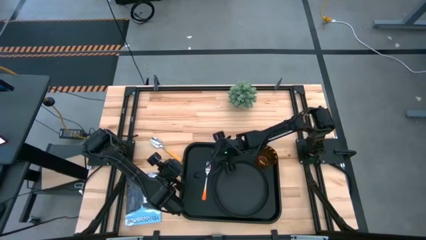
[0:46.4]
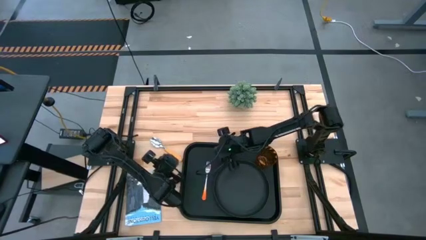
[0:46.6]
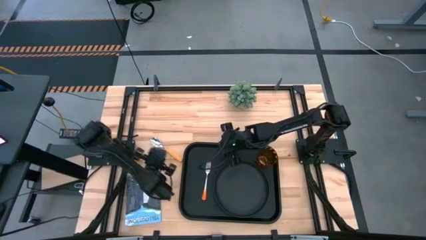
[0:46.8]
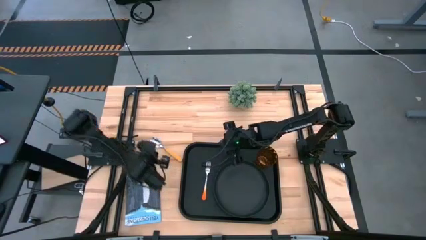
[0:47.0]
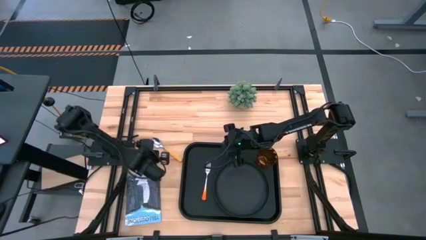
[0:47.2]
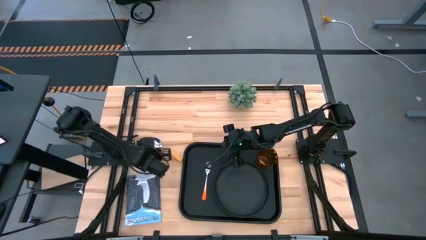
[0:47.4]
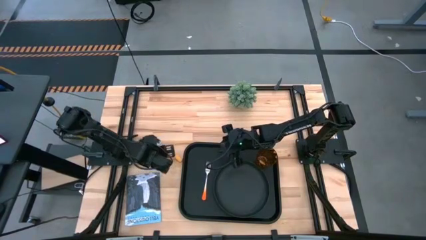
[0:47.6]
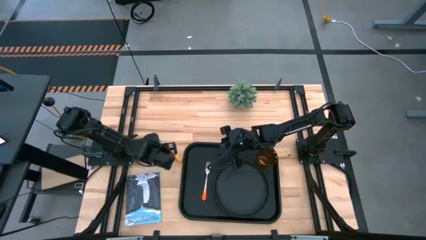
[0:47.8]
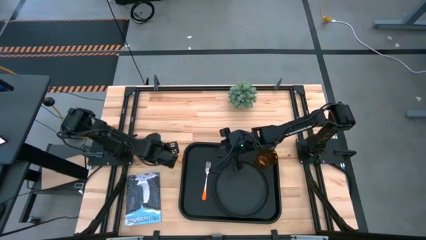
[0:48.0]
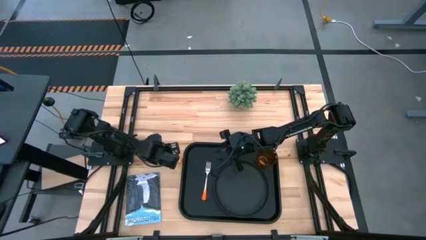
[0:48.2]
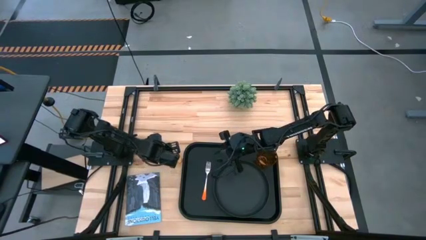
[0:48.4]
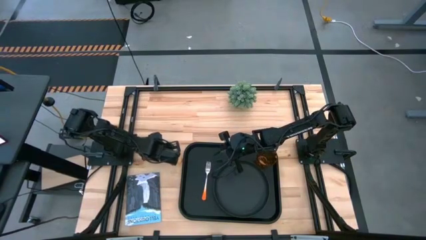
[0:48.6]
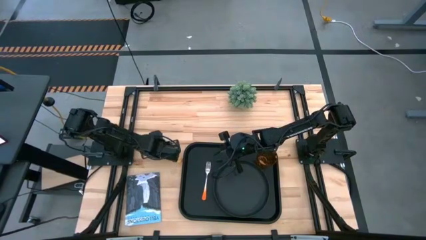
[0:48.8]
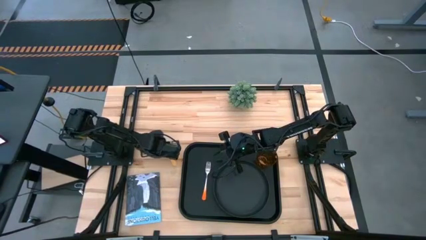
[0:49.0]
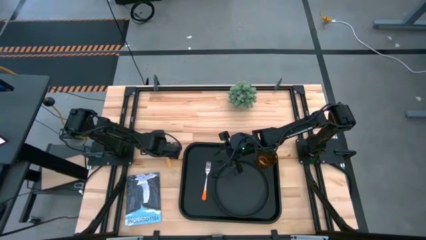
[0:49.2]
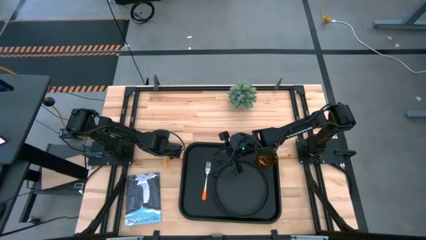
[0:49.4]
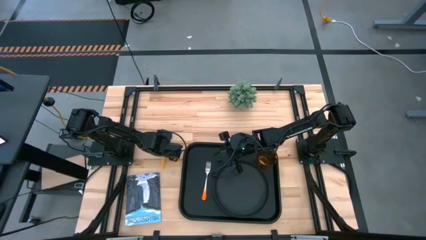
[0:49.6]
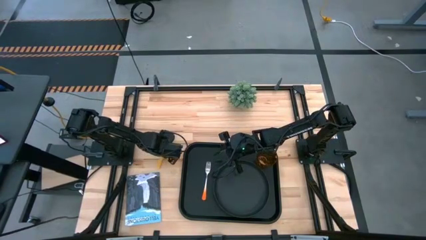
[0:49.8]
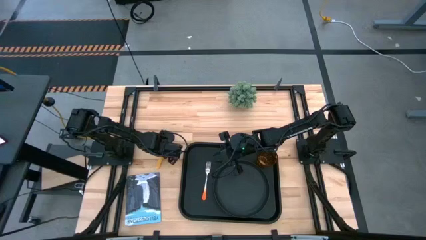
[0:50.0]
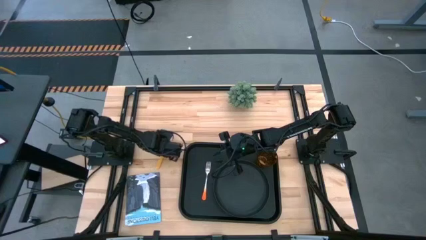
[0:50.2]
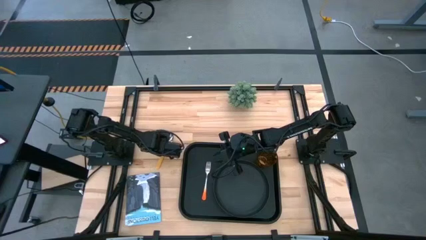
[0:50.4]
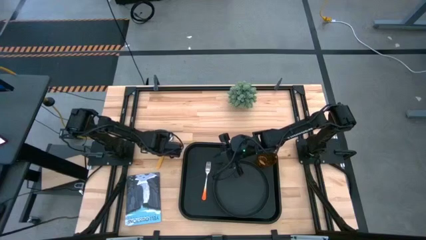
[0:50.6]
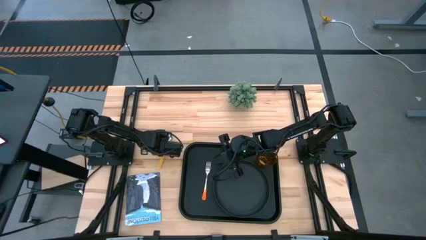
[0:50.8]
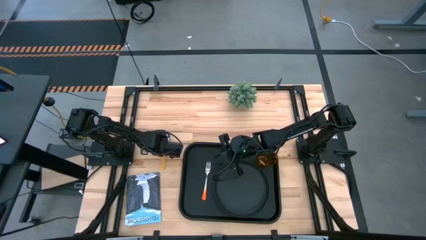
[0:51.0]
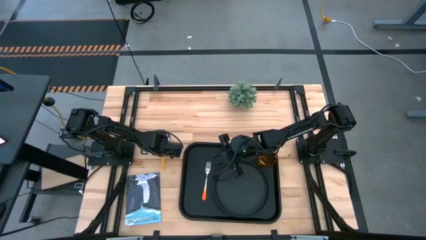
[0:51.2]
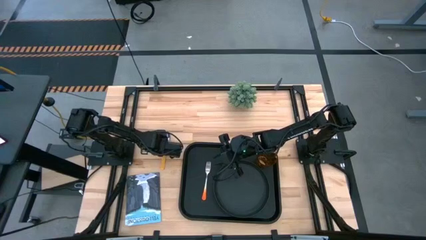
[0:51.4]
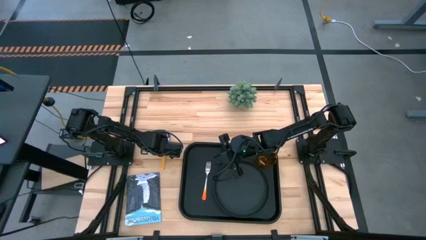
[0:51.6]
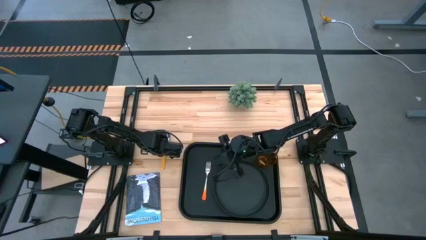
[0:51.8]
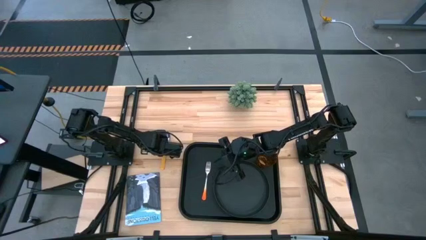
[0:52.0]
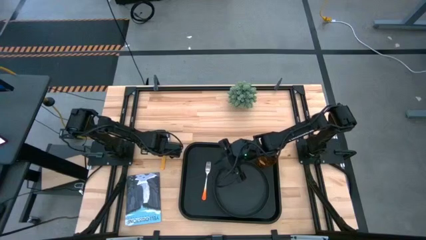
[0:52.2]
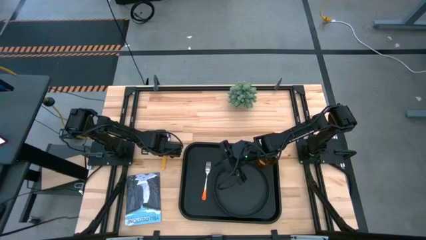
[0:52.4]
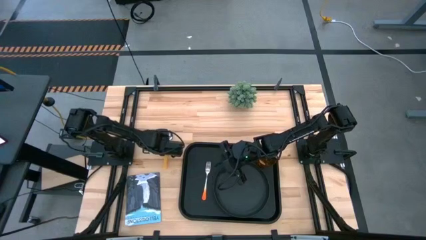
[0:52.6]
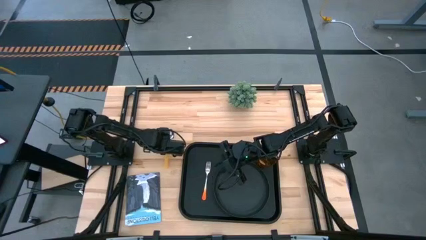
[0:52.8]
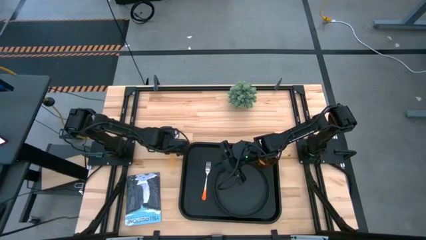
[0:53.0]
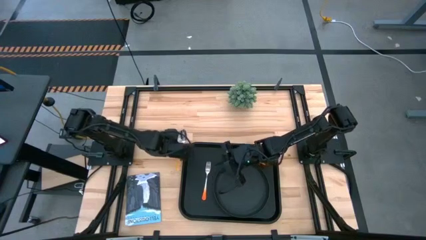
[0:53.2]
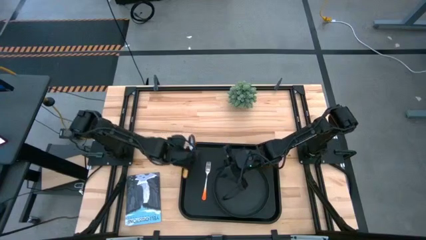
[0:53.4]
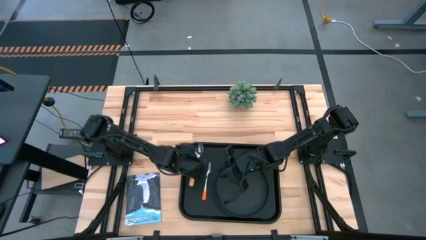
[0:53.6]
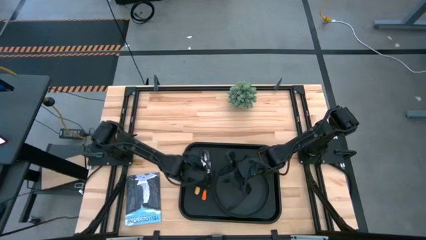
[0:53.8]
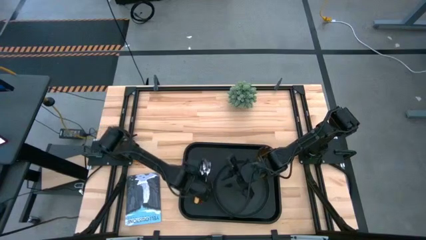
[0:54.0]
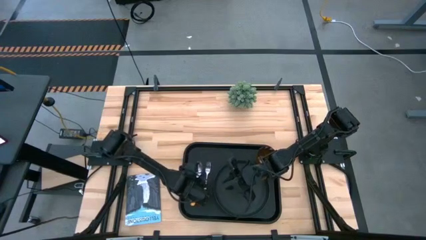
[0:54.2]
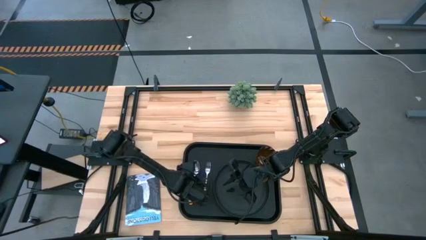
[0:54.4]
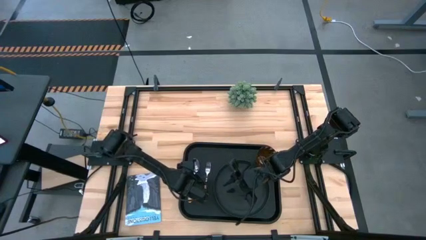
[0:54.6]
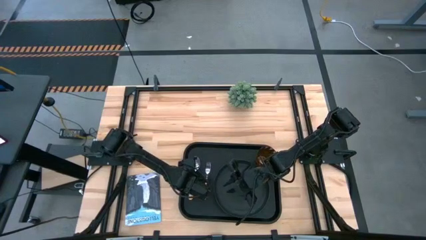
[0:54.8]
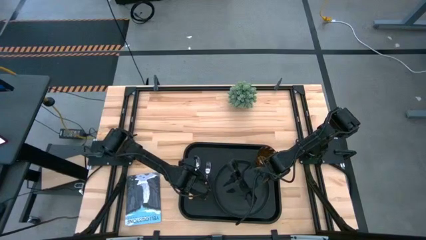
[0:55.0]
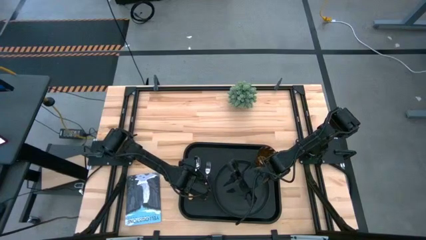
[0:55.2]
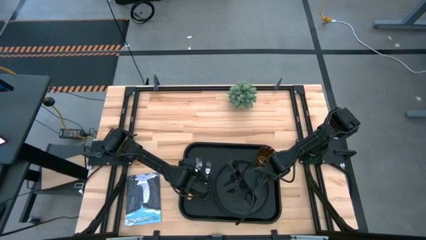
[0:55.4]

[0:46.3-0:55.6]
Task: Pick and place plate/cup/fork/spoon on tray
Put the orange spoon on the black tray to the left of the orange fork

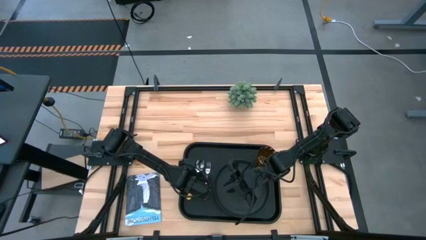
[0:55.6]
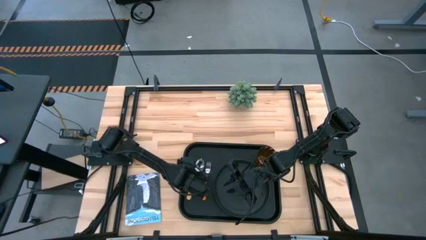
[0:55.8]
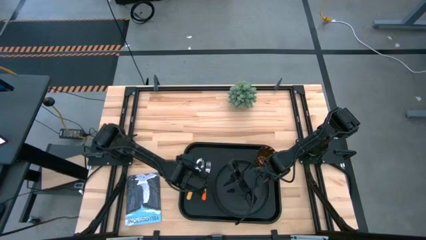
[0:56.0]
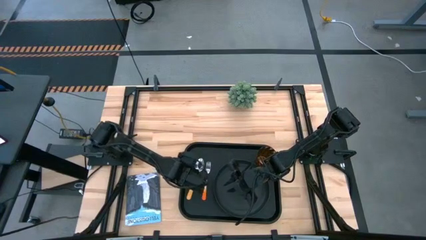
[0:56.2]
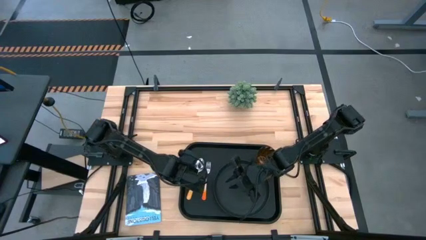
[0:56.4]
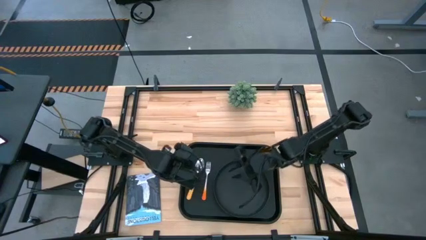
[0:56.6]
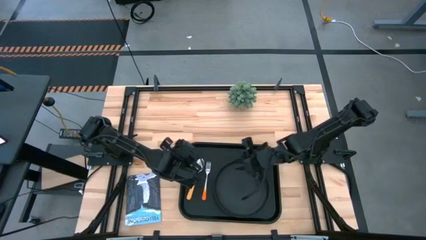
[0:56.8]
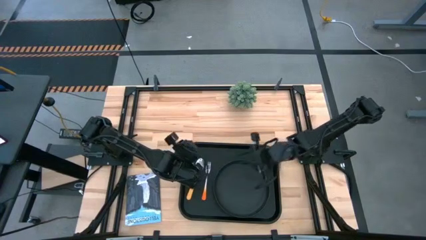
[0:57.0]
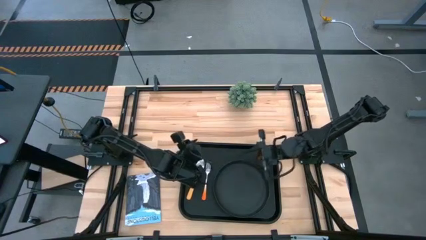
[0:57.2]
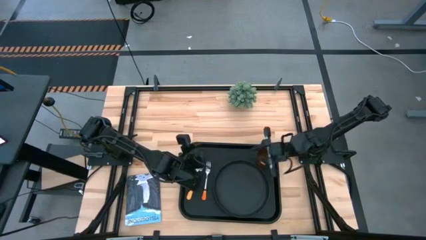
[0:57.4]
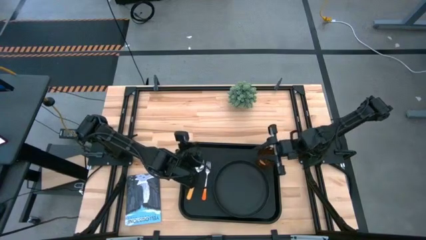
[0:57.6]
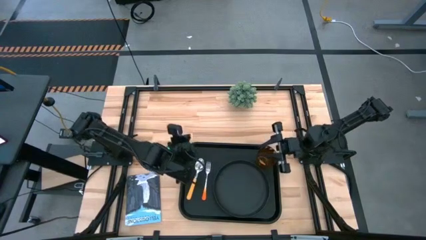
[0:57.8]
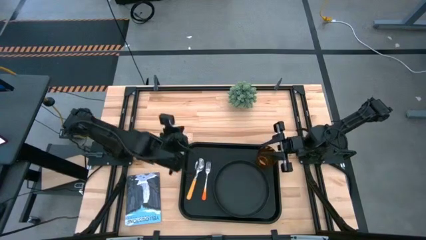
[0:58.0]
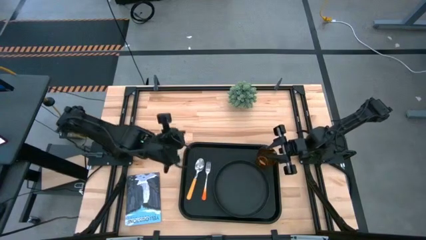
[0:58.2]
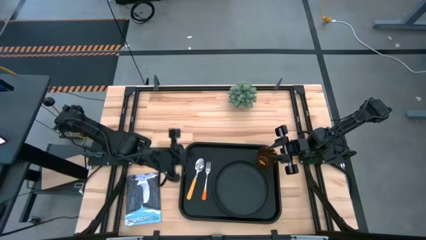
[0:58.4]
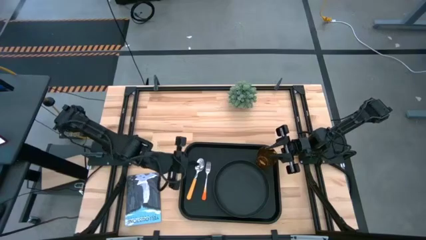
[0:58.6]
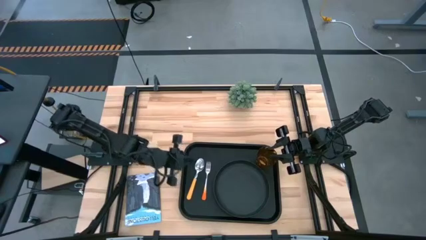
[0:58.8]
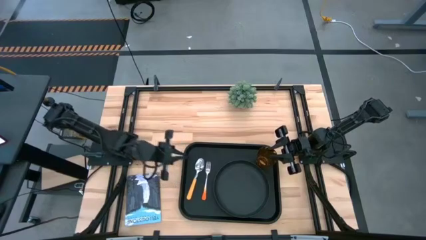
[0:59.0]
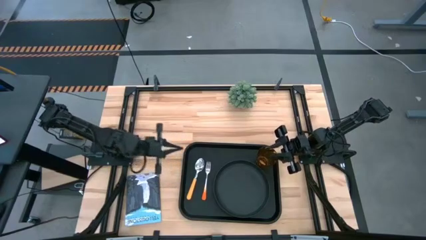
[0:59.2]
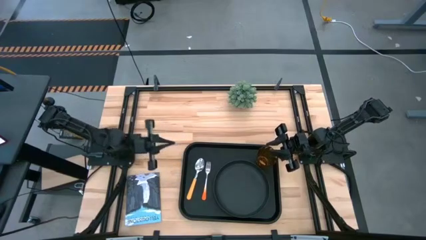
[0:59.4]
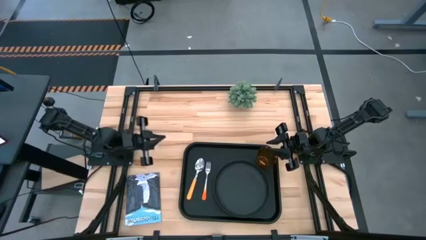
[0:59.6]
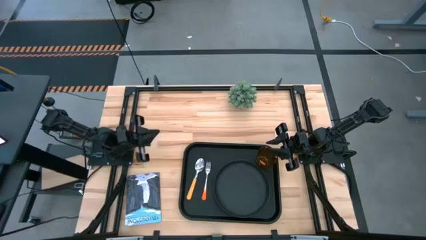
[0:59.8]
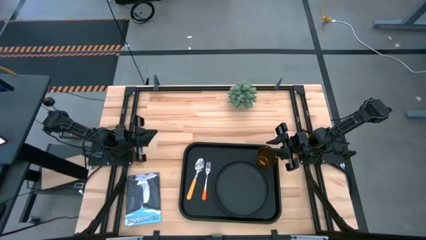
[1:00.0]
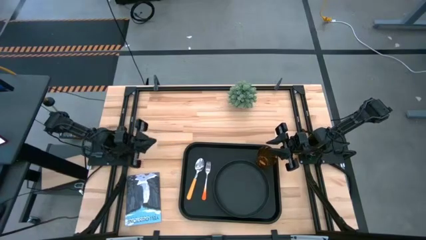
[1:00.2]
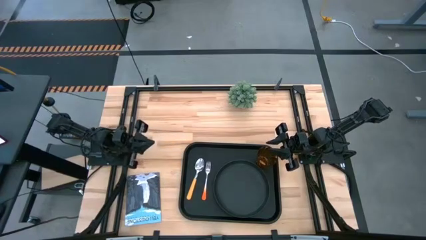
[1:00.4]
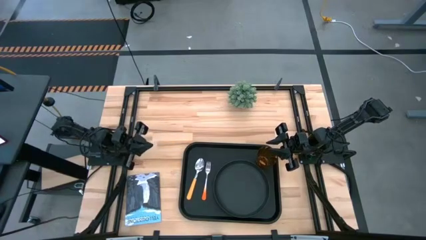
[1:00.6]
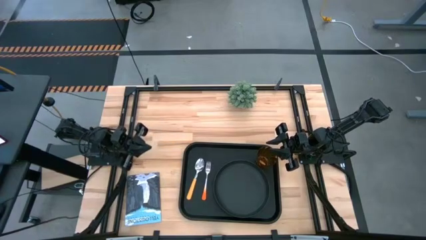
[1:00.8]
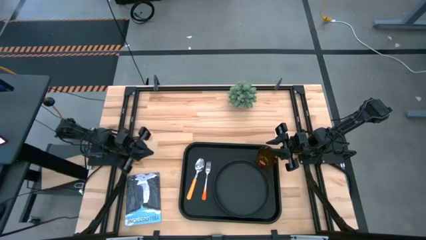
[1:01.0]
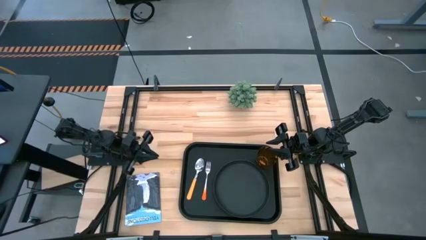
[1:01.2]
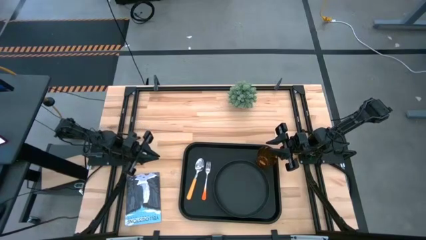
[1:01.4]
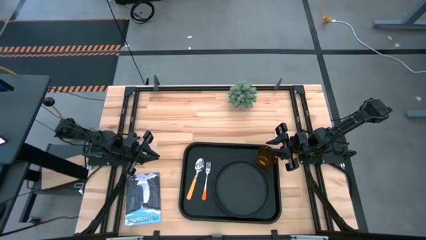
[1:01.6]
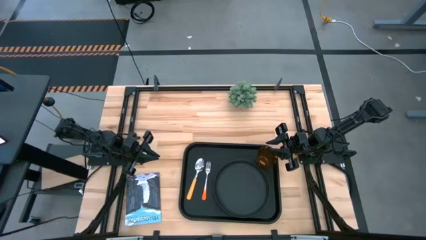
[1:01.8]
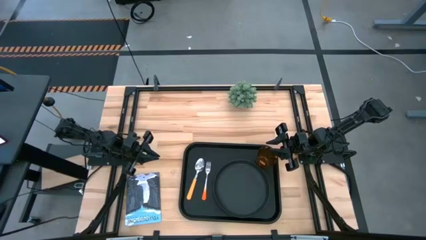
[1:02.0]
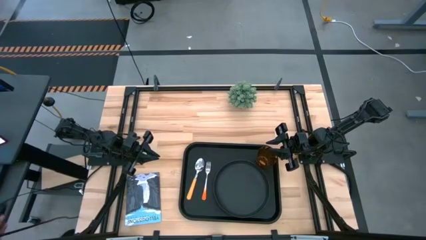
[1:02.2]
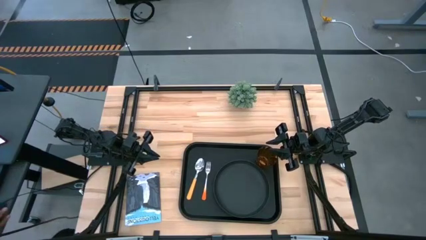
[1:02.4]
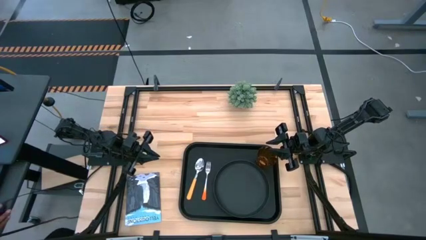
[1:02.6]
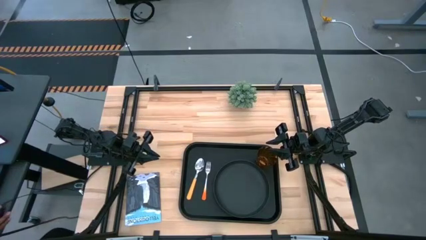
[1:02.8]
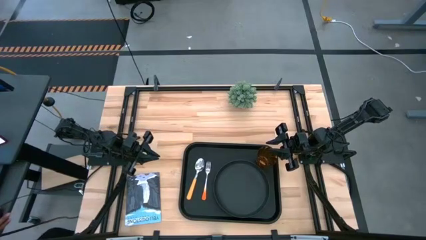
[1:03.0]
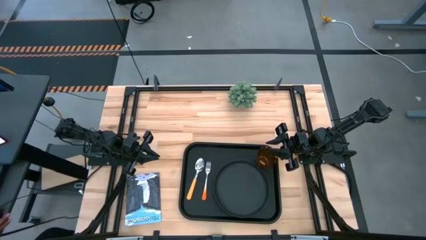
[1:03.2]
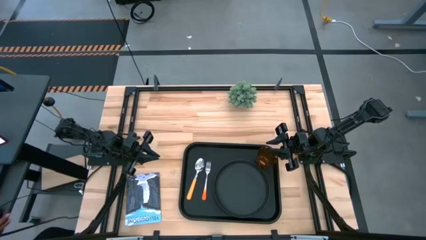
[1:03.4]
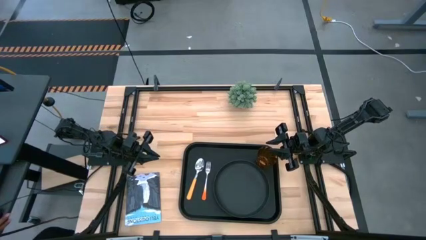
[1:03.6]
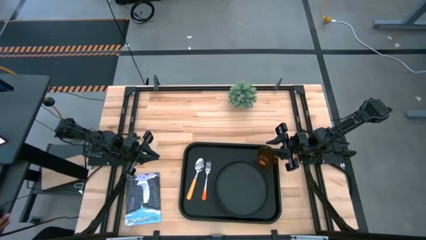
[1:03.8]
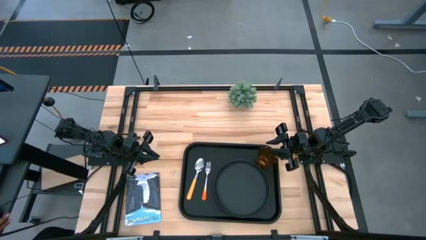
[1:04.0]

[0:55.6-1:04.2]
Return to Home Position
